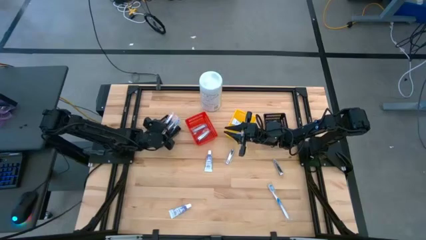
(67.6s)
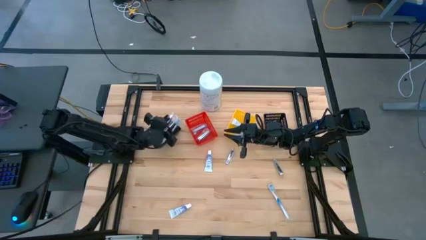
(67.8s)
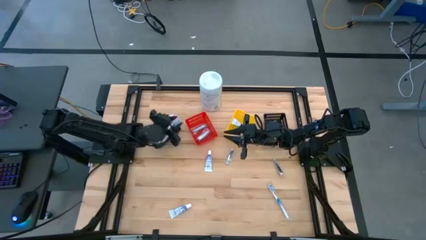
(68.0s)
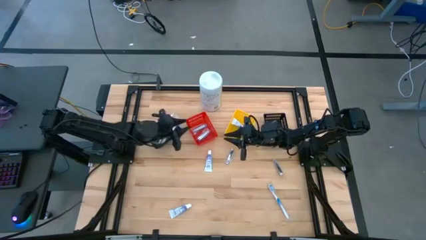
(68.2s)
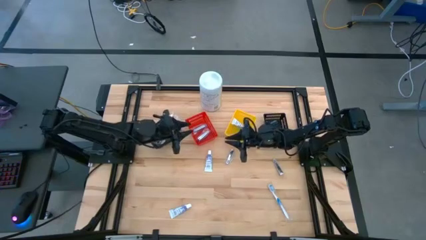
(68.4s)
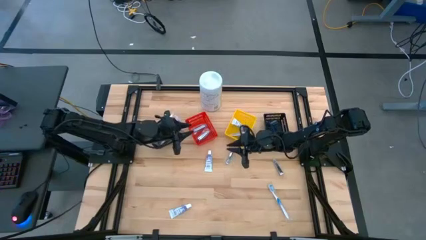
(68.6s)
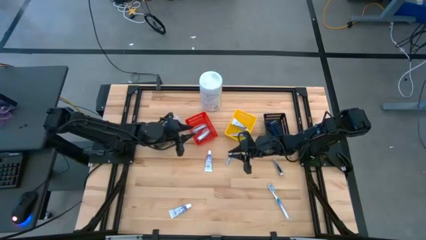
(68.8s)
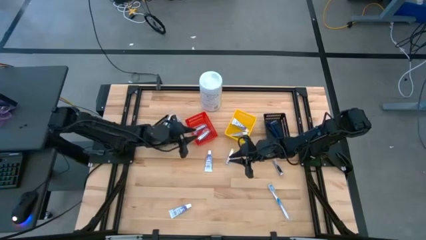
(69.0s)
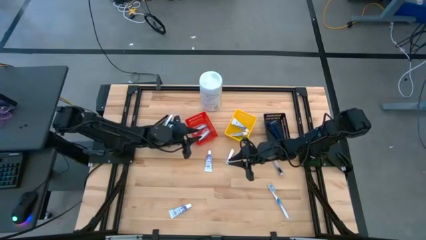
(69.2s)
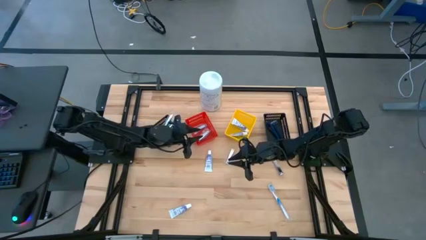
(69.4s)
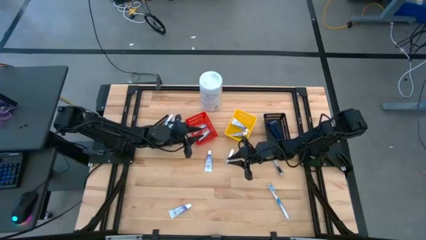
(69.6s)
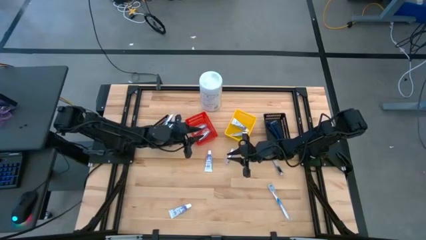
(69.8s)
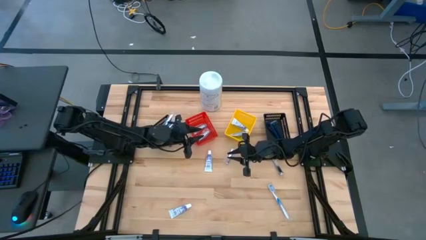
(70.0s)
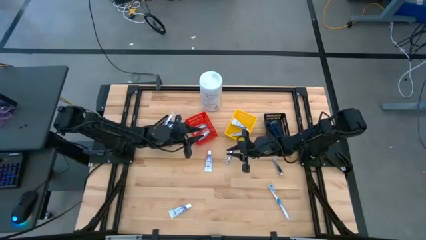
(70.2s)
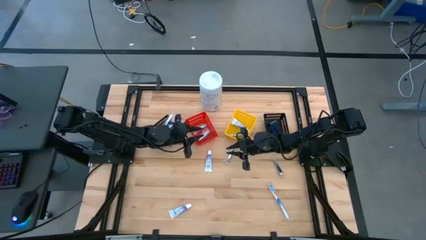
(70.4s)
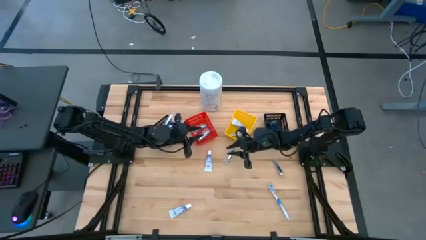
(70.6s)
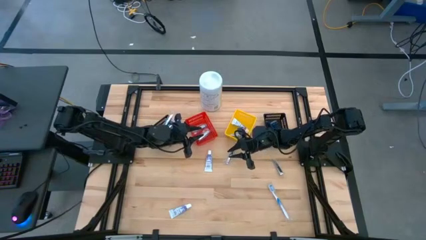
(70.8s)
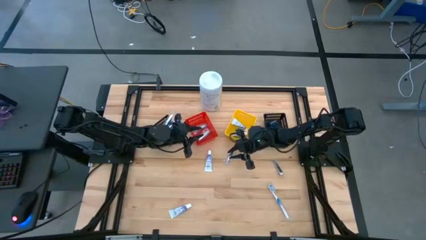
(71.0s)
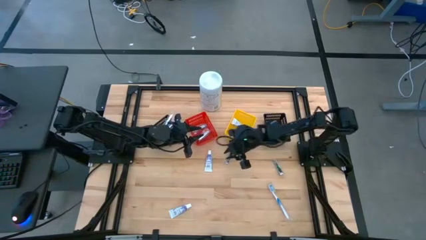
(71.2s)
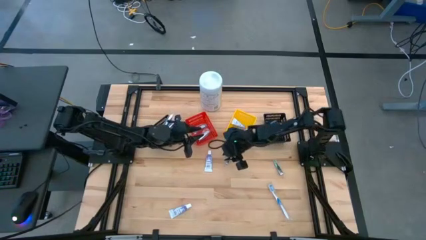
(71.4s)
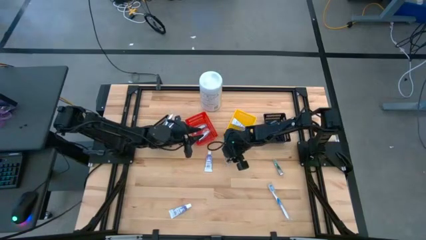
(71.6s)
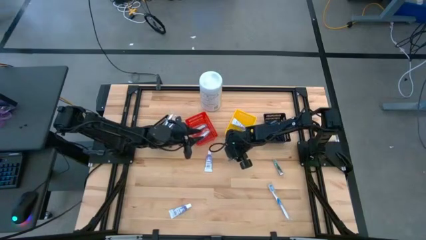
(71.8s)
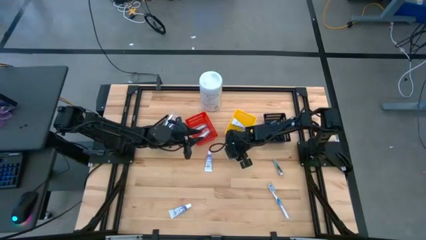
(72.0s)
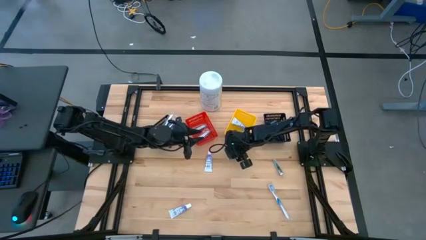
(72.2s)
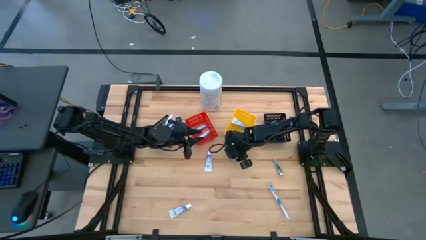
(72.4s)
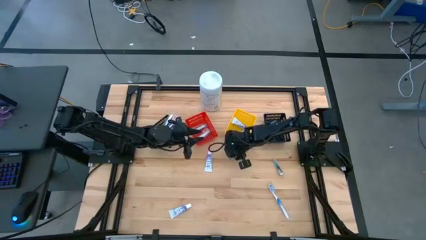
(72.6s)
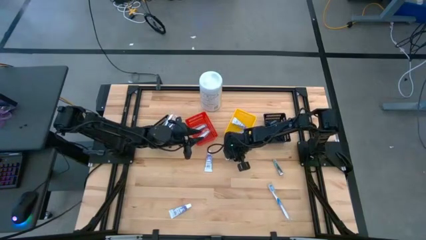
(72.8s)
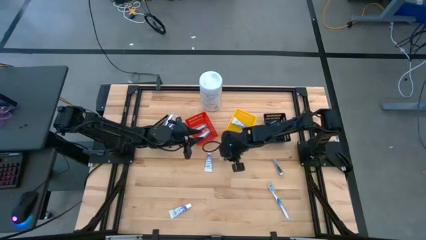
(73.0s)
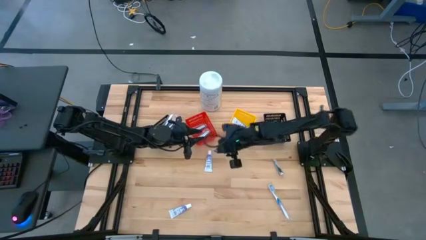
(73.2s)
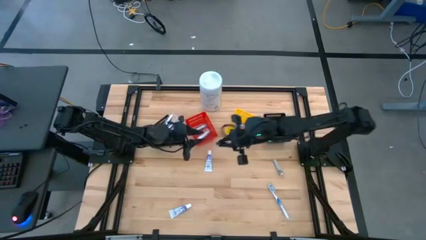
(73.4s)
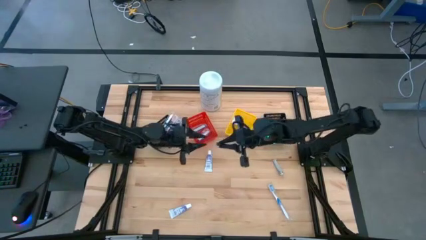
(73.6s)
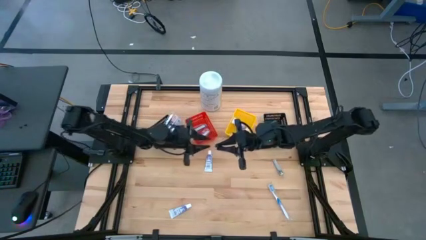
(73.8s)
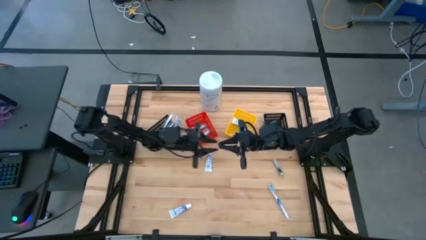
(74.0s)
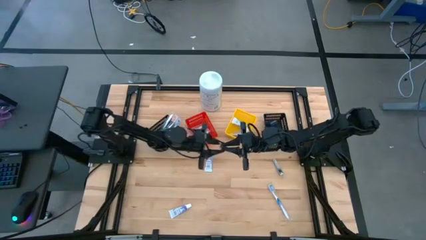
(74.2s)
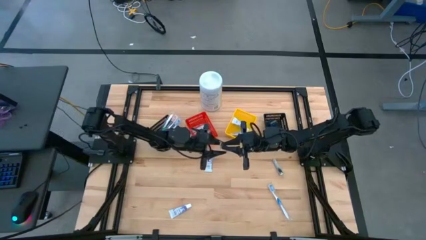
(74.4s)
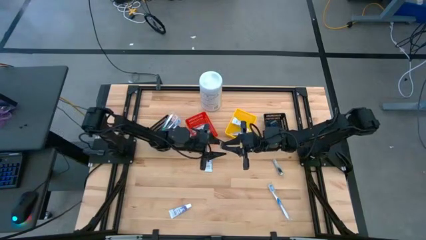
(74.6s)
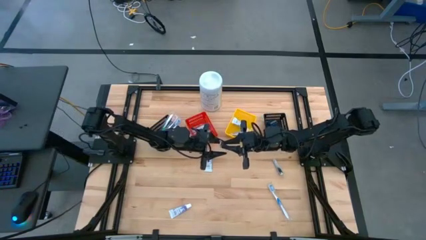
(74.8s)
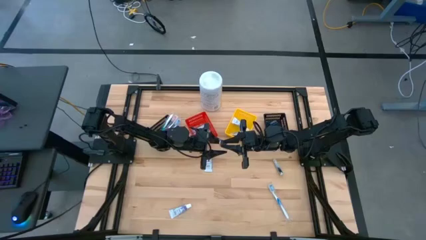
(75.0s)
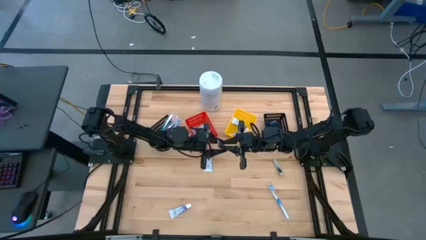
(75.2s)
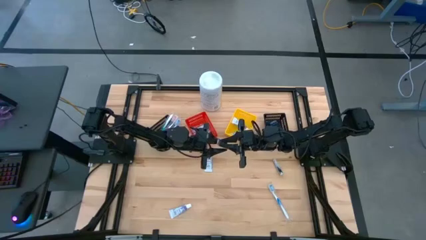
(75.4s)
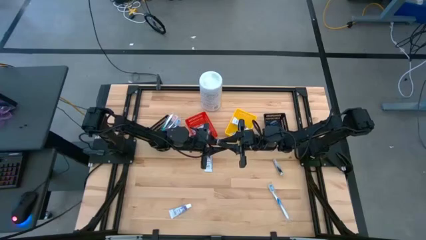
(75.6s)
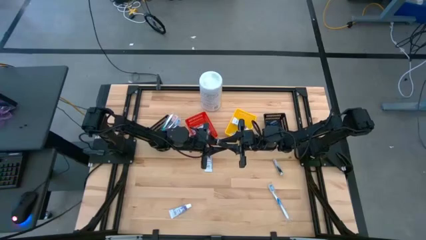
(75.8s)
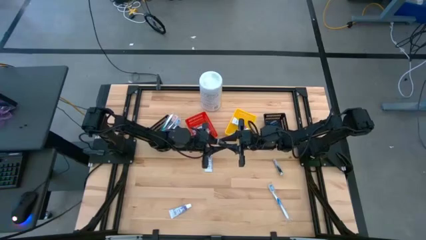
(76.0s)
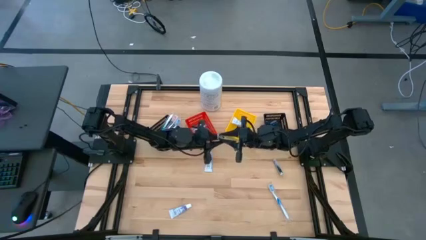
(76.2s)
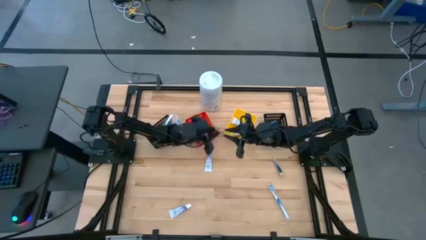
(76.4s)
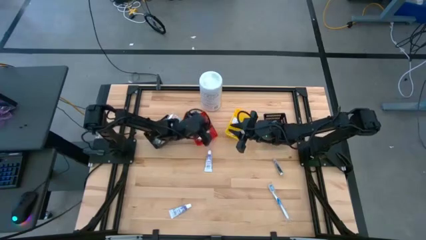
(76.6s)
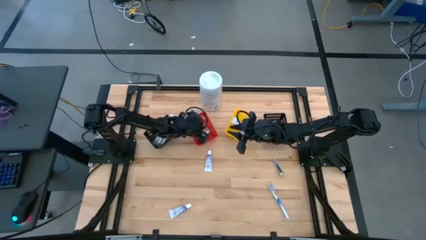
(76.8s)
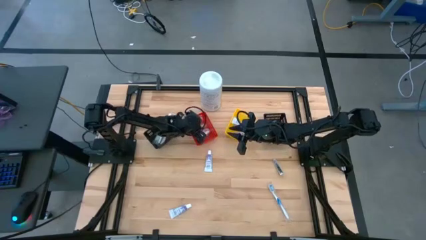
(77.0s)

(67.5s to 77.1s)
Task: Pick & Place Travel size toiletries
Put the left silver nail clipper into the red basket

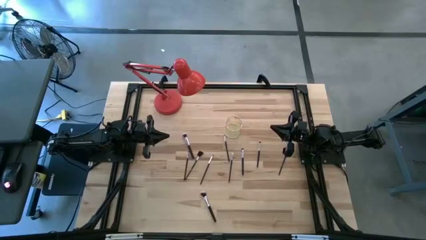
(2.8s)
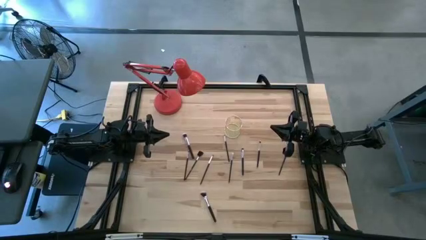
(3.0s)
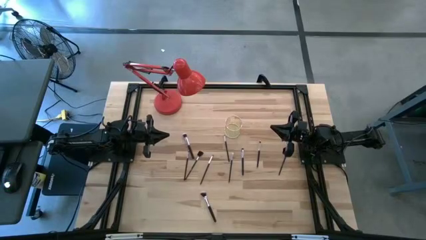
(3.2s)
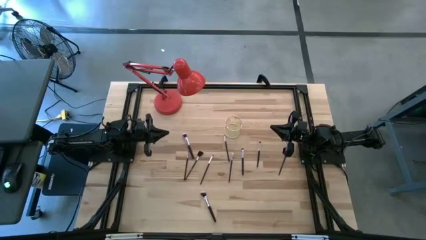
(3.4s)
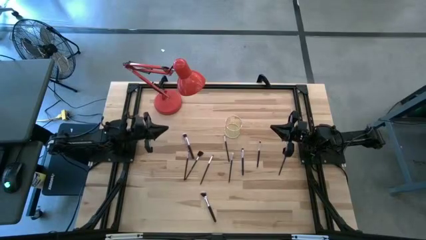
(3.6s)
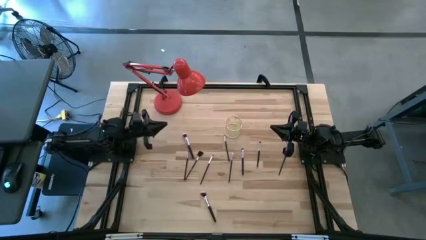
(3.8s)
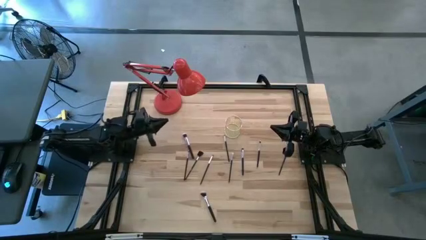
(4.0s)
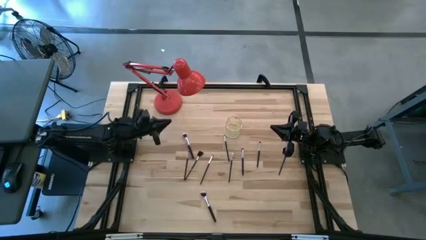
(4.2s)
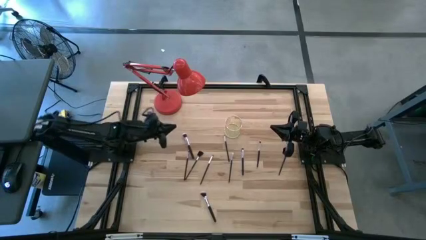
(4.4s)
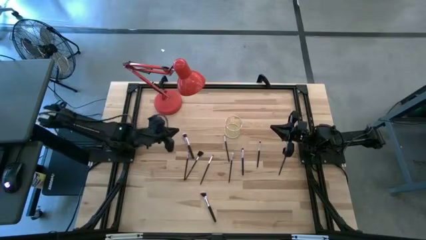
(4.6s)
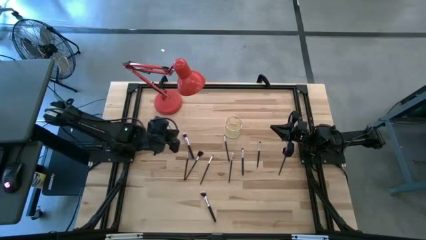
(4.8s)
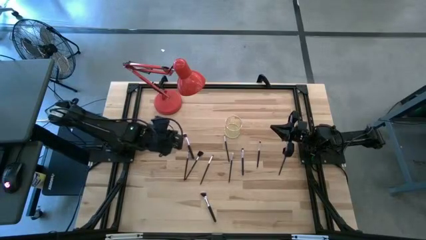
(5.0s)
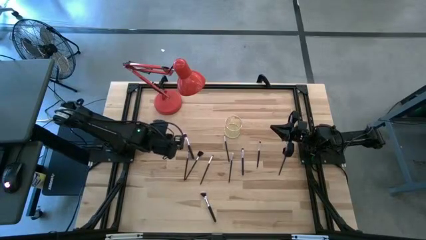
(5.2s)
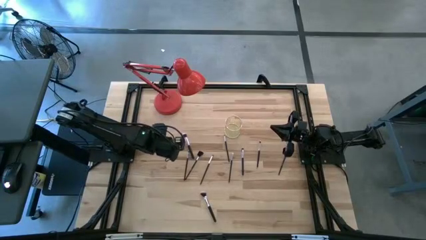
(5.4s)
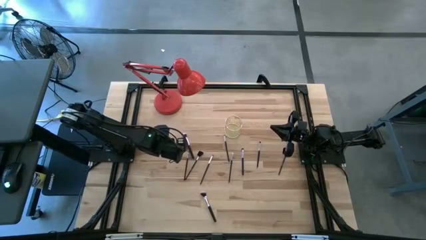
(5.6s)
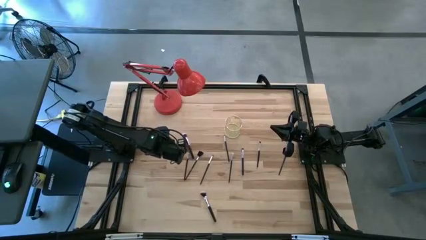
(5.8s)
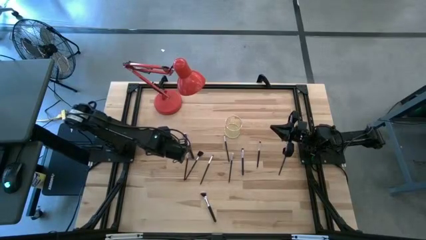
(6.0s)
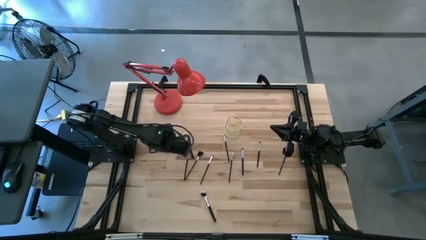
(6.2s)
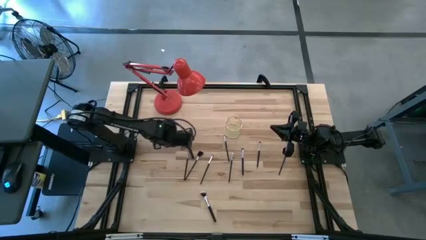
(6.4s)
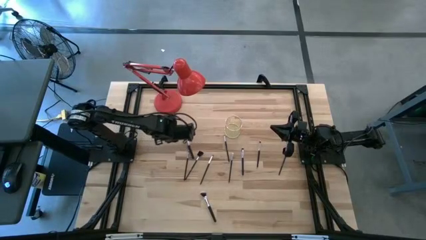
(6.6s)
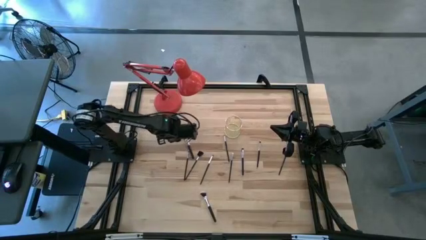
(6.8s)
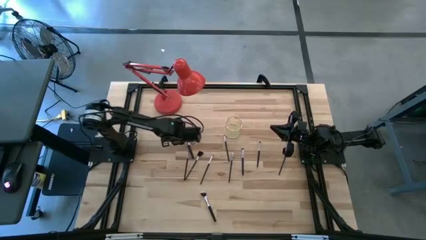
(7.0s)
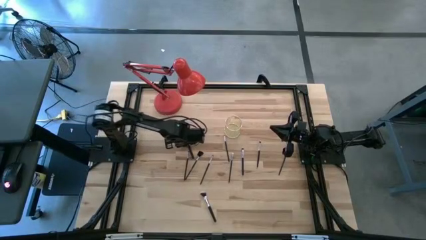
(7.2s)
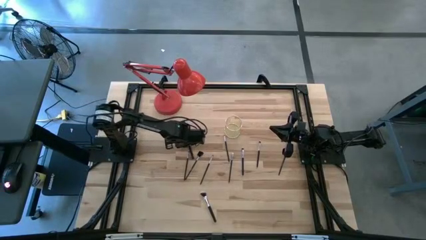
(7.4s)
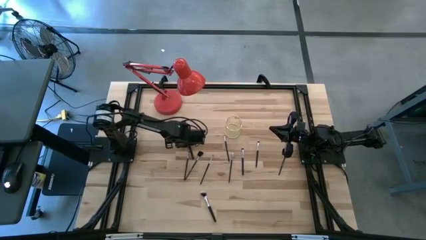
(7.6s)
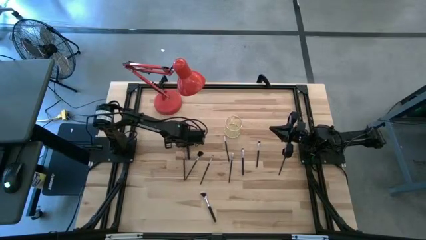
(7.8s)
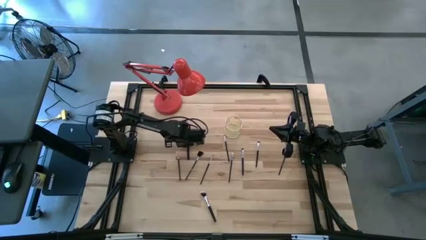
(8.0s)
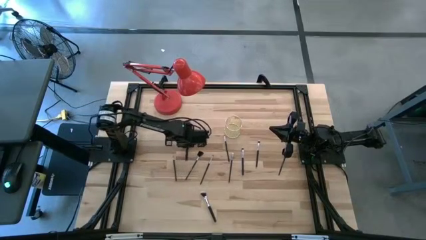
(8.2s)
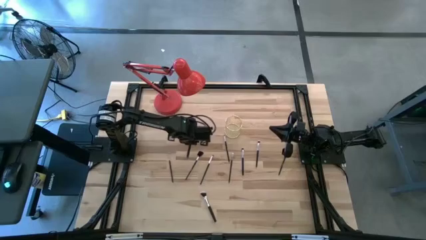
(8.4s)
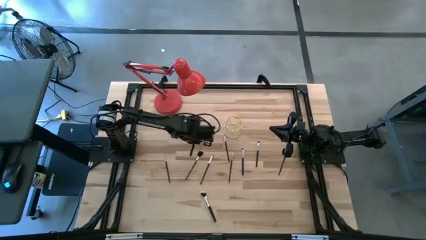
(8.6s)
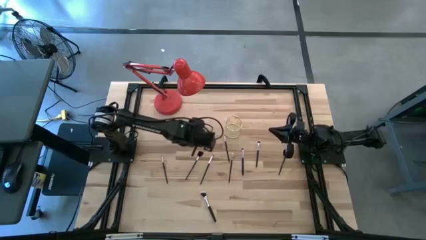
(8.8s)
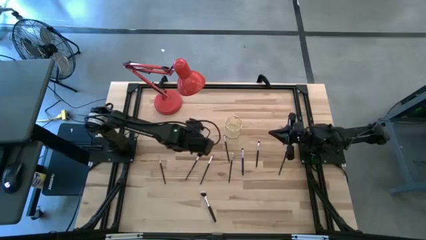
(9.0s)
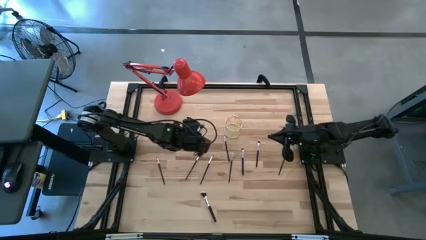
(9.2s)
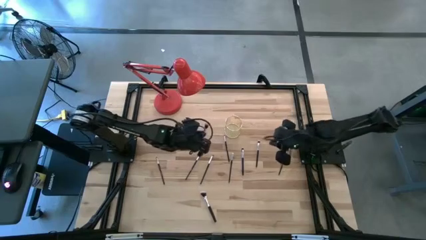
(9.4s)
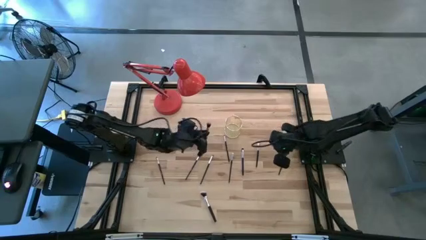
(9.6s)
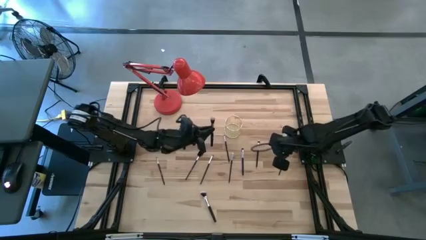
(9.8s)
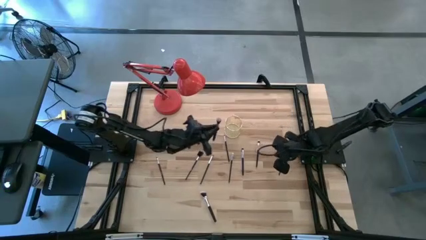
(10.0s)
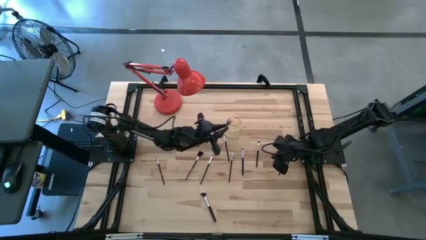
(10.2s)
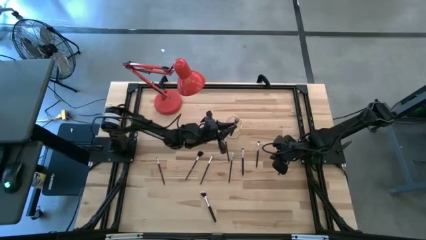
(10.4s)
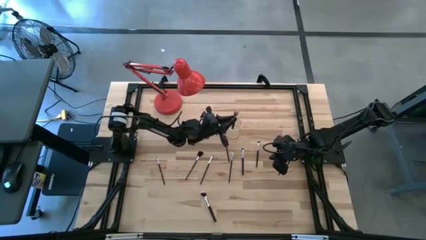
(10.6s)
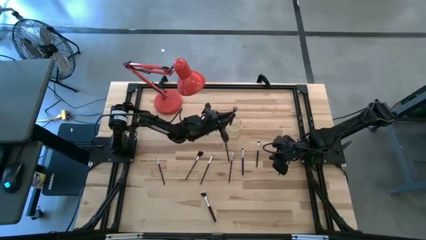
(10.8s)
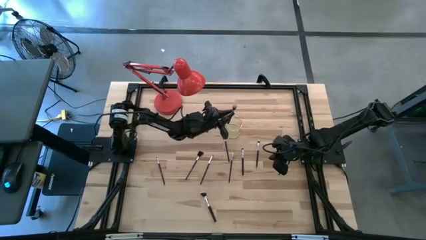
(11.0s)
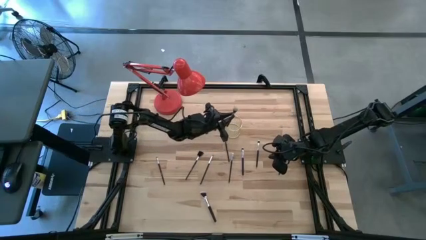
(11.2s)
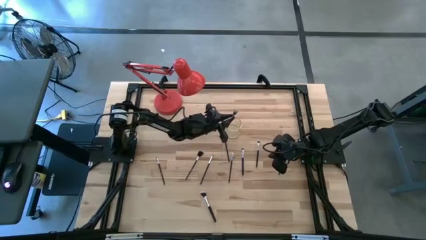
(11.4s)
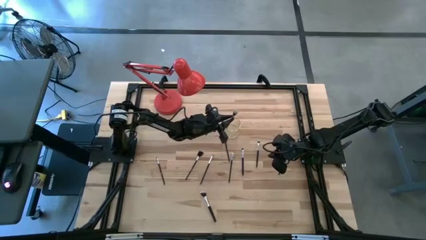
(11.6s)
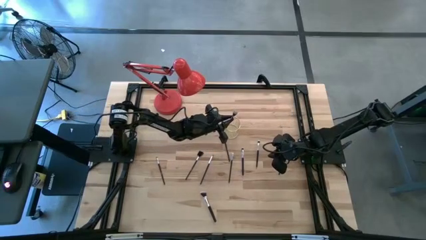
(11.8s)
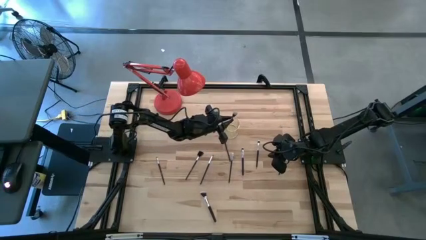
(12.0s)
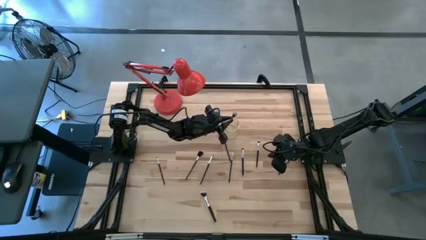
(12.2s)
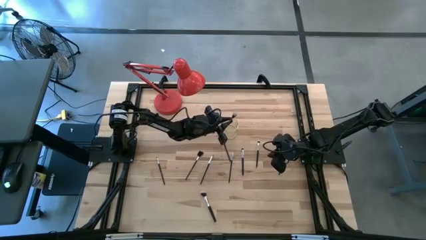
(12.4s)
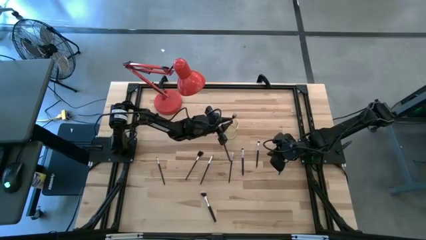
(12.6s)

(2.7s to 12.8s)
Task: Put items in baskets/containers
Put the black powder brush into the yellow container
